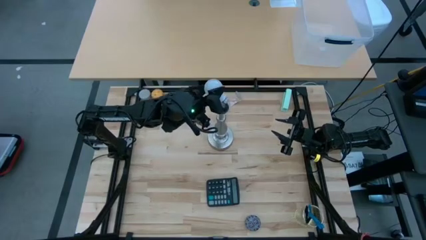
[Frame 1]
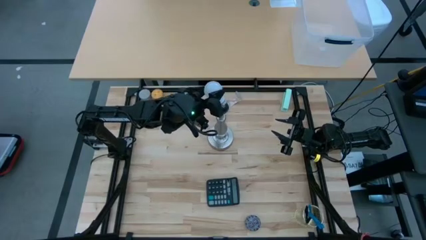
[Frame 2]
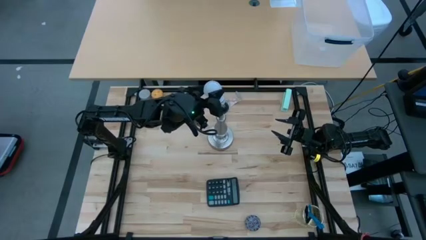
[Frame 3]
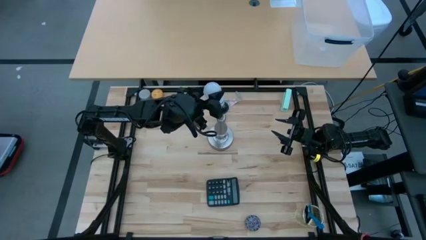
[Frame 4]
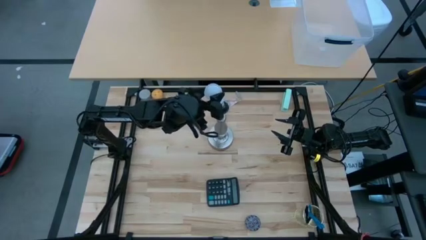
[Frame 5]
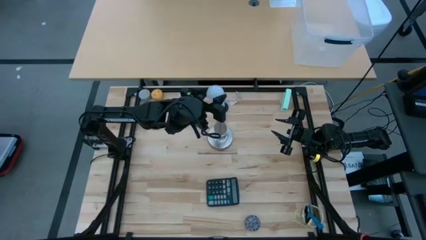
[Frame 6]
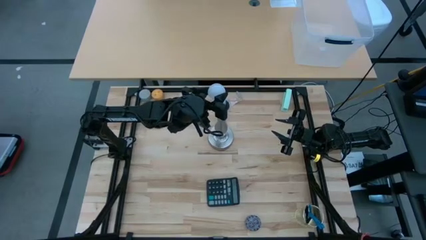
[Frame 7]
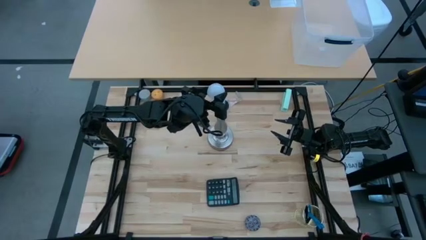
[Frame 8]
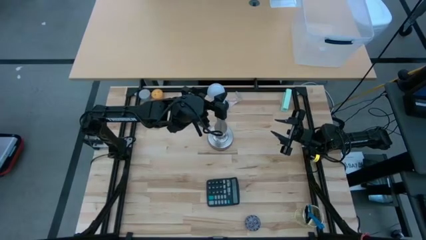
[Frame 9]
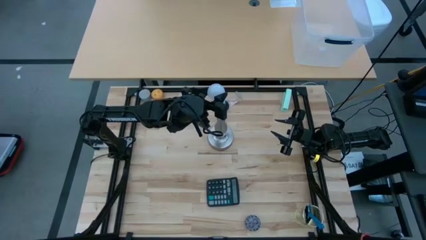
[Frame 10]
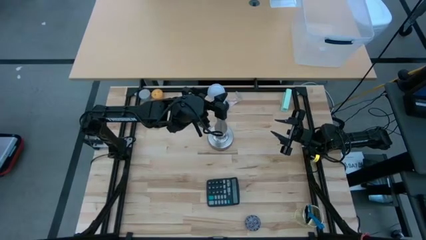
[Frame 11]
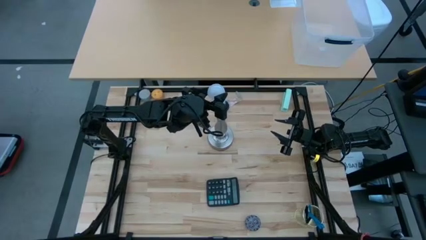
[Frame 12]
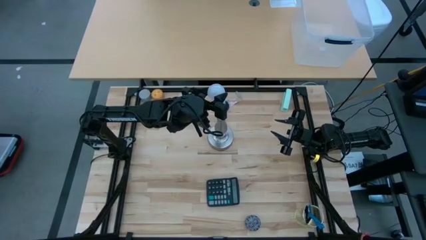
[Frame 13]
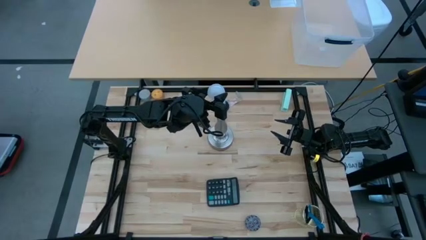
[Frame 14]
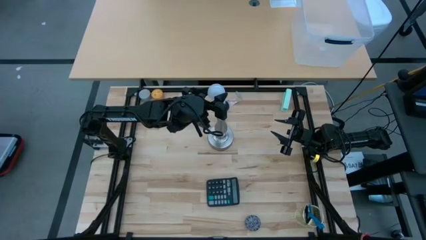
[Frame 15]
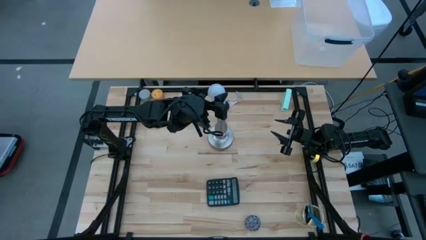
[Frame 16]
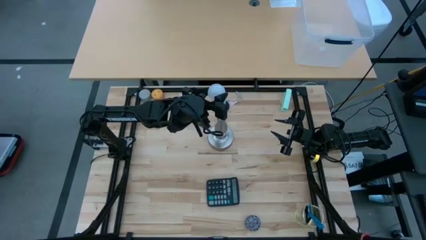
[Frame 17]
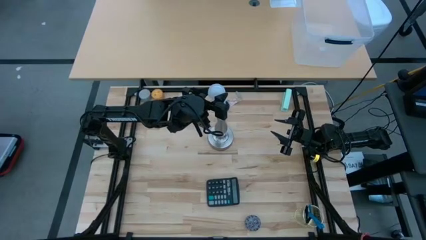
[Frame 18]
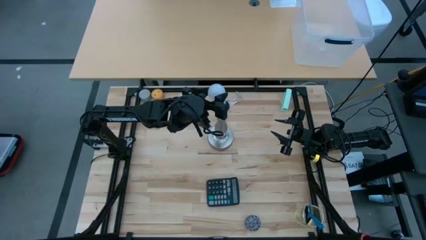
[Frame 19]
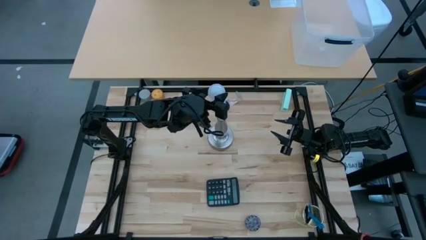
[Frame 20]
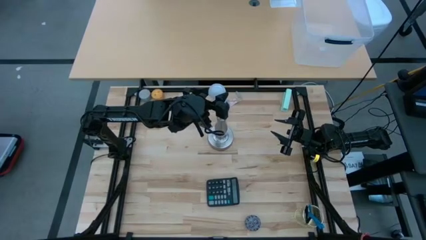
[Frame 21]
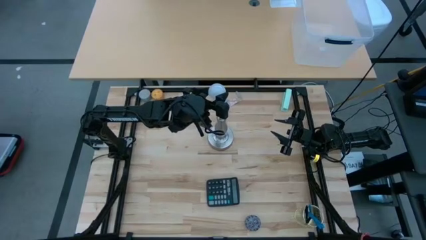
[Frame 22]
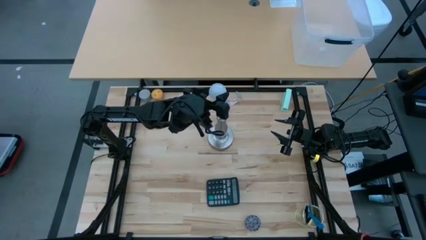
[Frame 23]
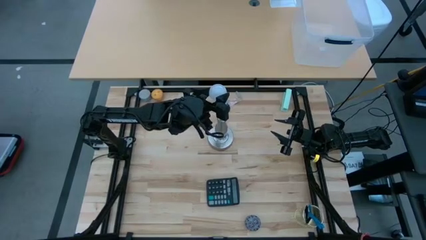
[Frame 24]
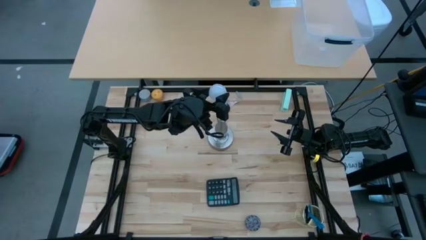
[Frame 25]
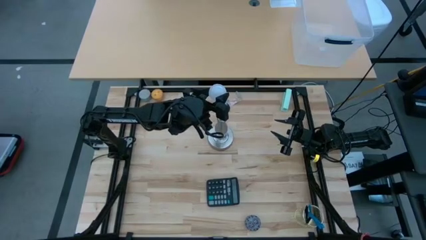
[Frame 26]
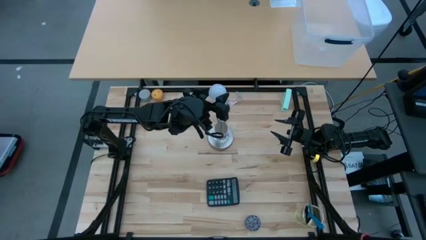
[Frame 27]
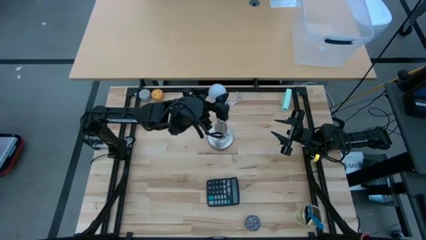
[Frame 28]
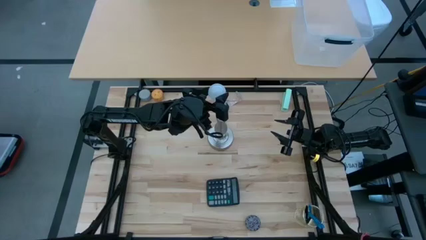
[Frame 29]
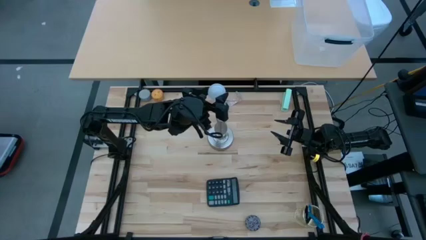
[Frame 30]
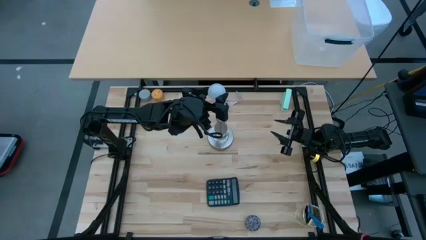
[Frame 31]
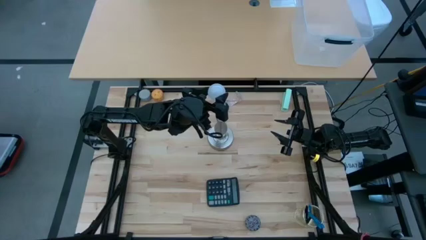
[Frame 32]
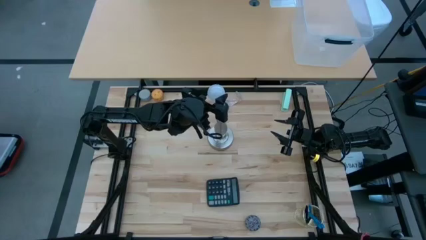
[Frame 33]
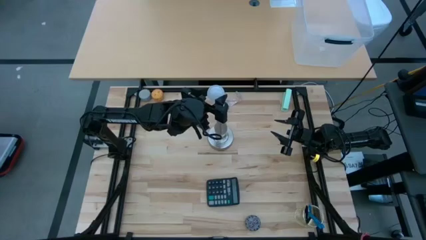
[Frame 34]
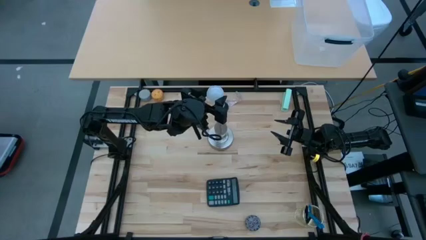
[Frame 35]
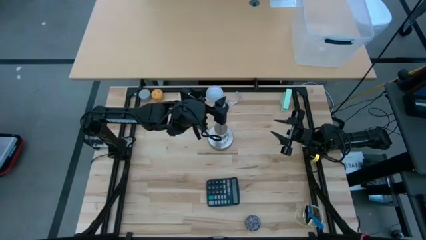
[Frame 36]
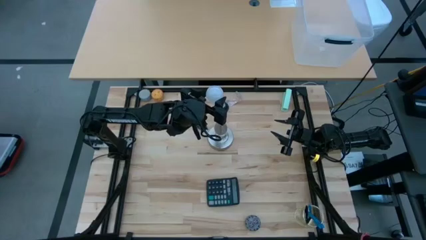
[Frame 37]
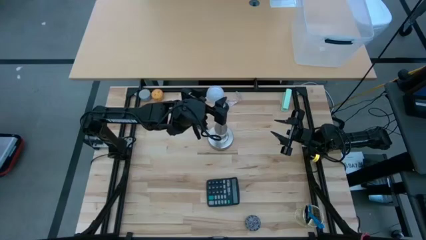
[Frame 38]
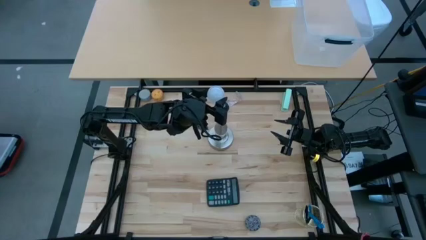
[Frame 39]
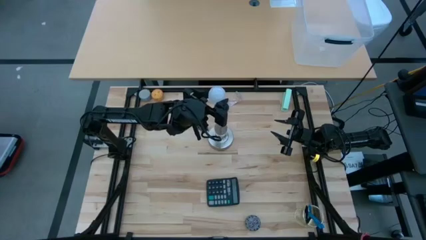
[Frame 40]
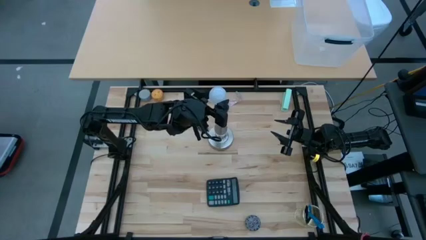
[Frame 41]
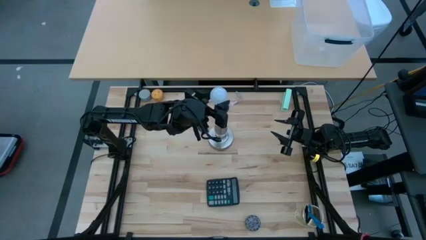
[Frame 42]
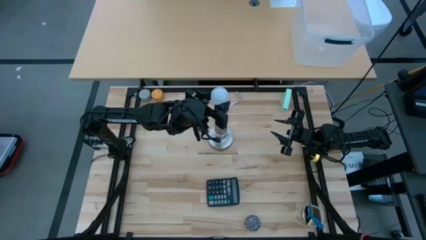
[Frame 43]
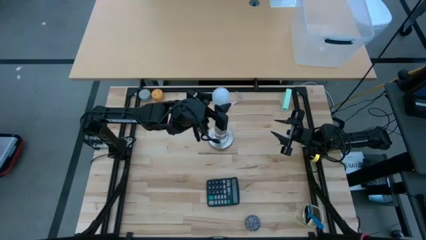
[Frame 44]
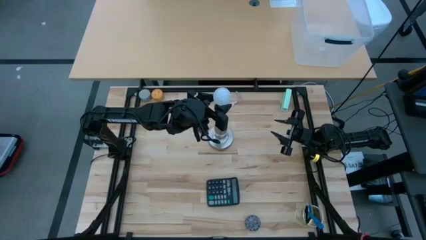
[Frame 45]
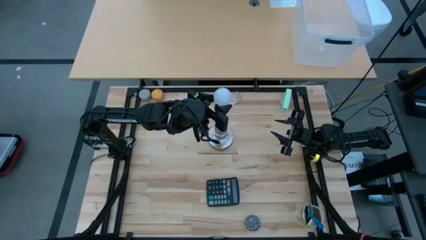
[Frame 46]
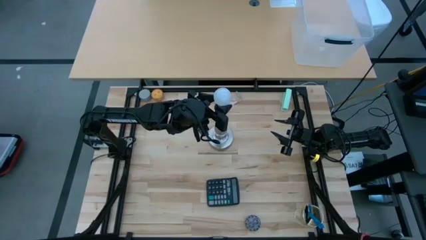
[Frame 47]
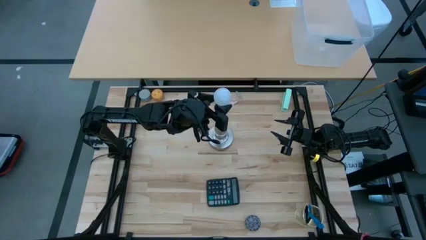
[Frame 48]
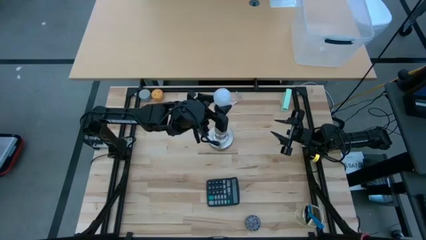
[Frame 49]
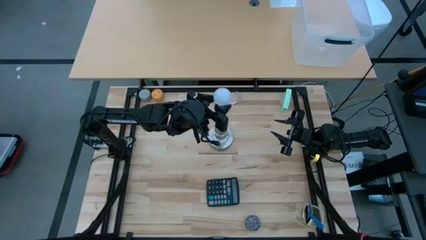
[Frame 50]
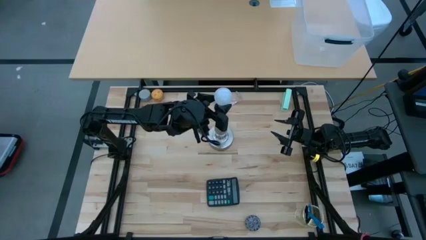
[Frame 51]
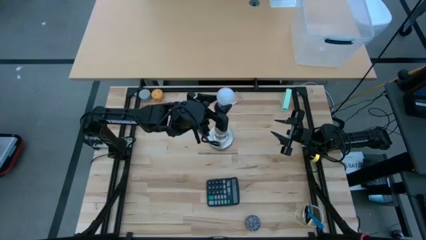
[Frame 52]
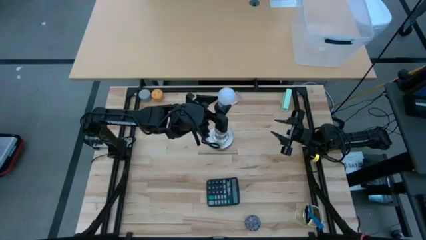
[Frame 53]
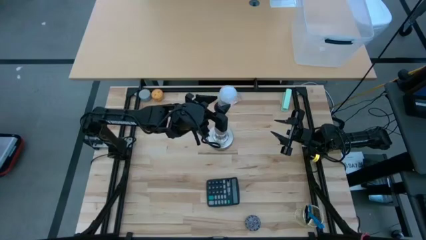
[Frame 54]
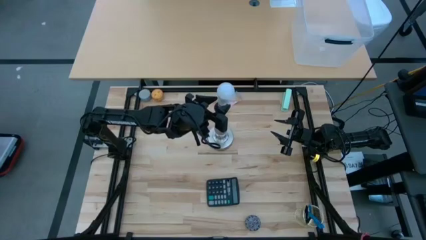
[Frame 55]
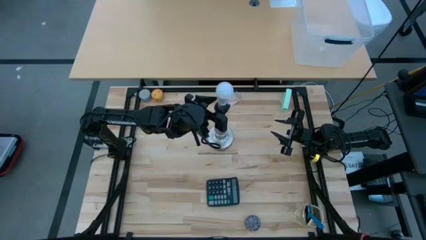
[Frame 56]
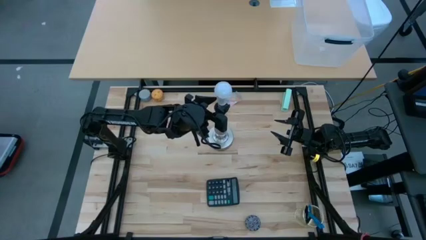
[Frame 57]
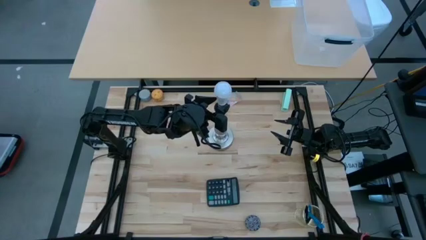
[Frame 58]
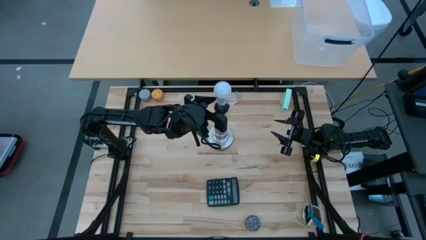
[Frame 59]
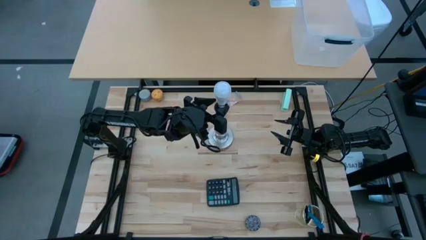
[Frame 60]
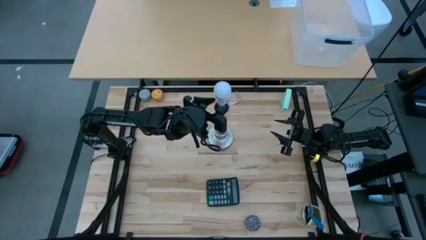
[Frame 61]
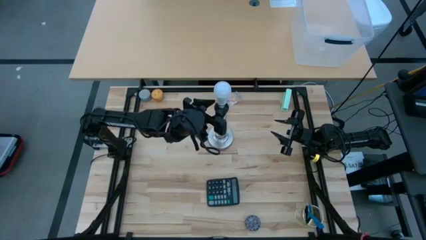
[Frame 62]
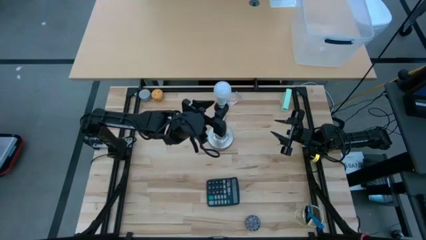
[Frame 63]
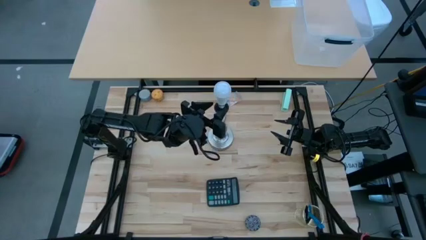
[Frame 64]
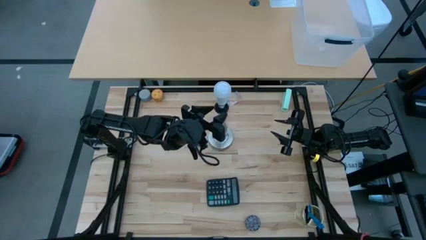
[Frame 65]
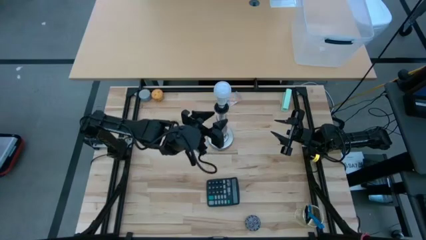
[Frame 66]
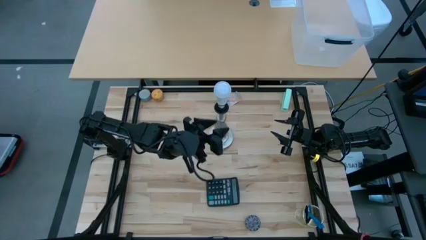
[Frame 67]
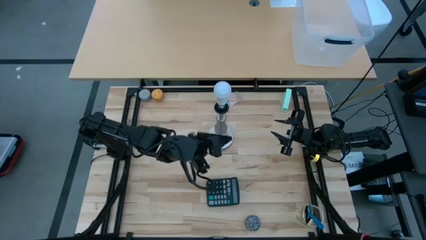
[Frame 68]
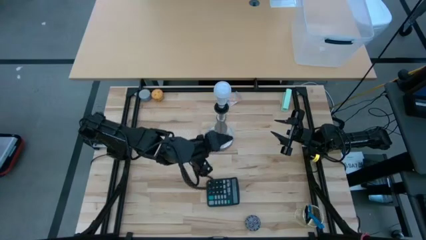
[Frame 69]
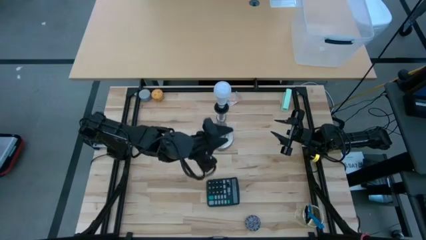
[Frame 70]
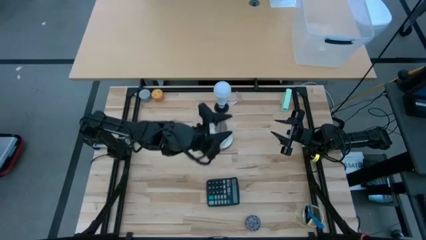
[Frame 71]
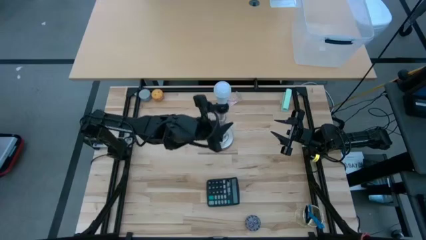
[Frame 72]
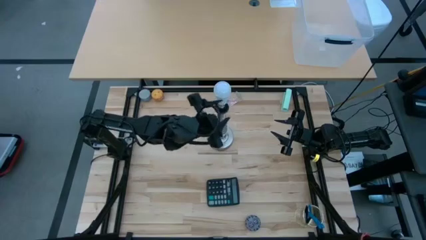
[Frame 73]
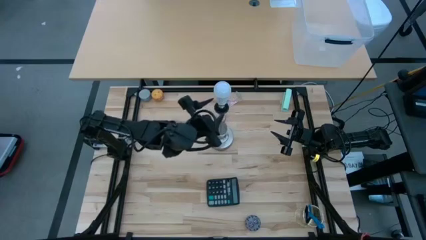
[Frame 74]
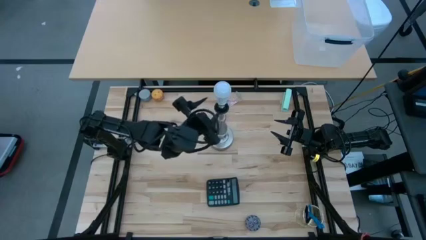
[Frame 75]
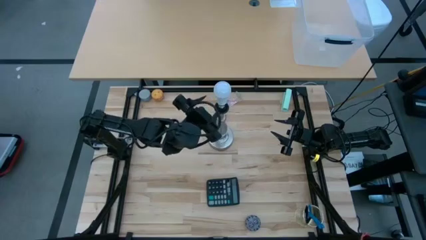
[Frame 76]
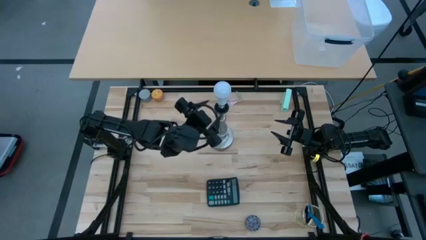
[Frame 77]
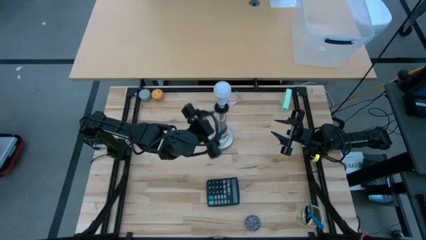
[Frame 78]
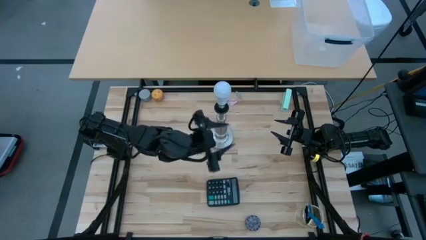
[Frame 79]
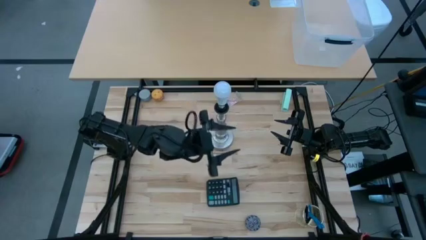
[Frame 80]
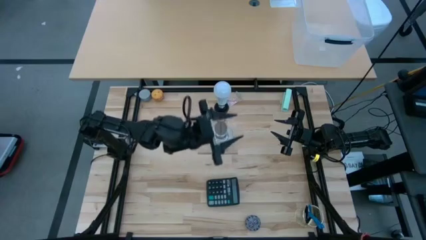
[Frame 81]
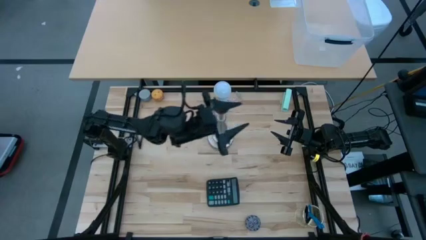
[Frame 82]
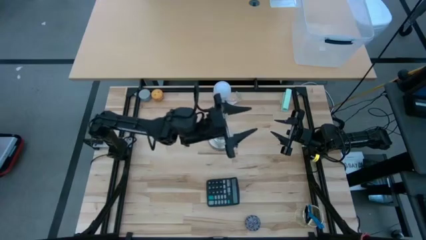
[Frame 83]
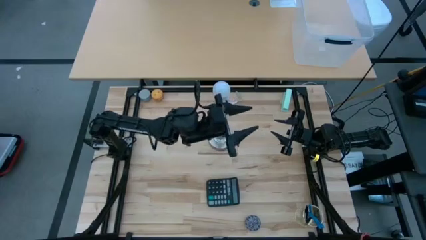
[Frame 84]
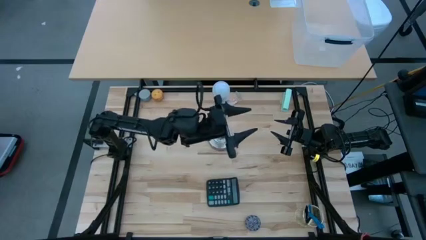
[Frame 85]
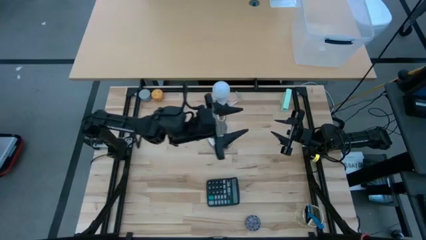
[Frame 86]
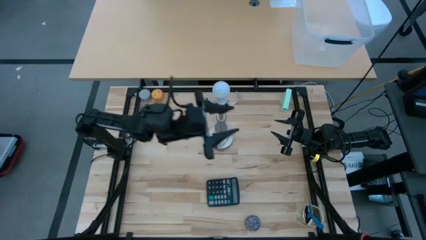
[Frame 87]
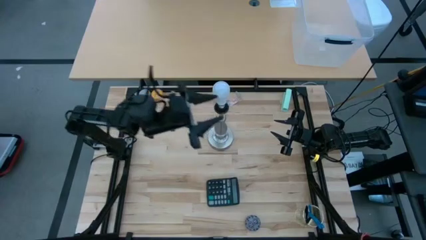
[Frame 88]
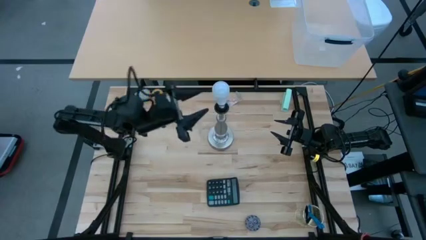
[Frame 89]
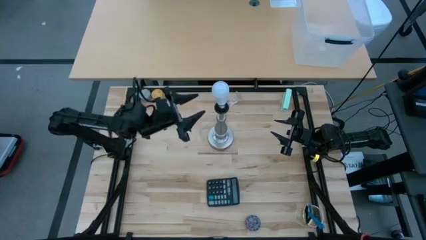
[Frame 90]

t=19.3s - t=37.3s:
Task: Screw lightbulb
Insert the light bulb into the lamp
